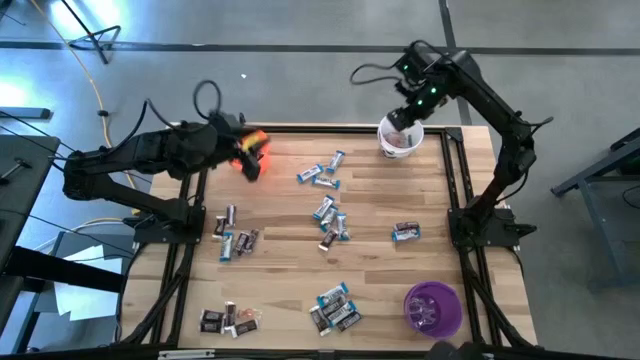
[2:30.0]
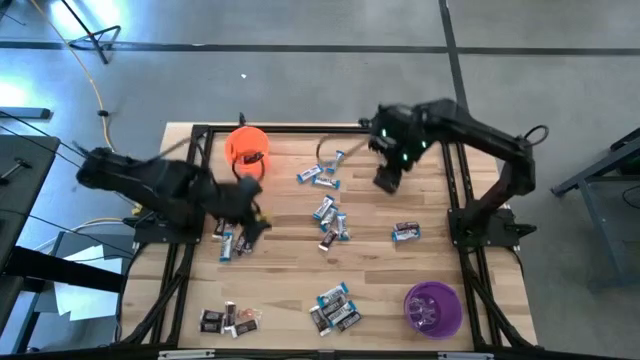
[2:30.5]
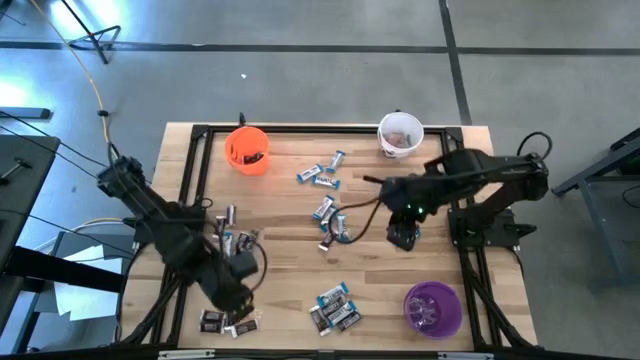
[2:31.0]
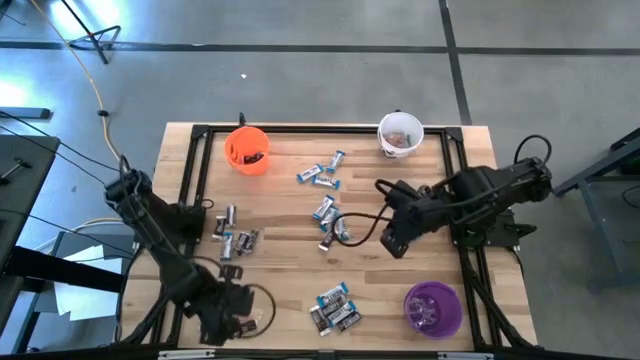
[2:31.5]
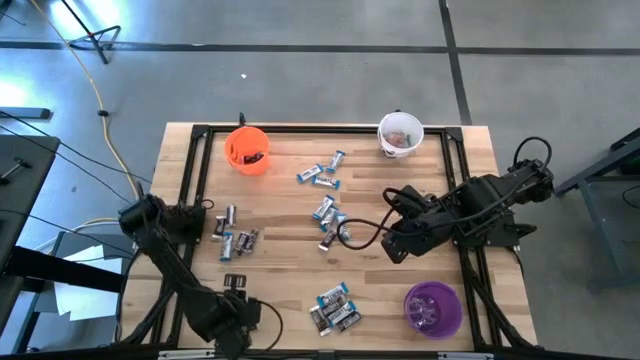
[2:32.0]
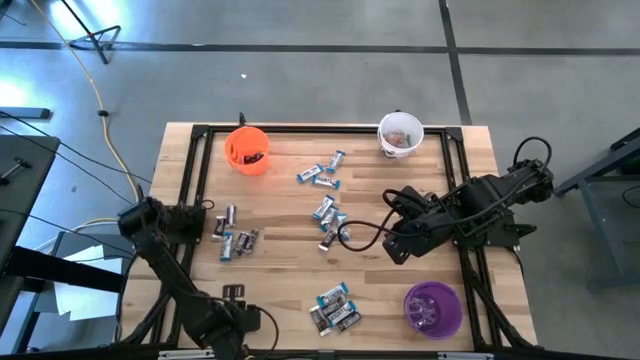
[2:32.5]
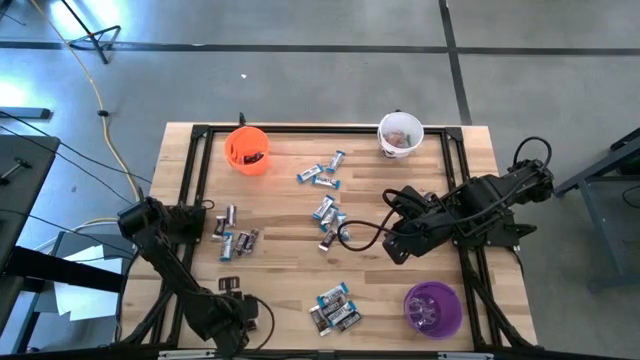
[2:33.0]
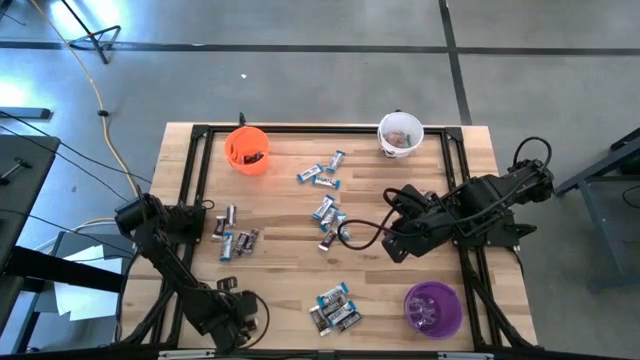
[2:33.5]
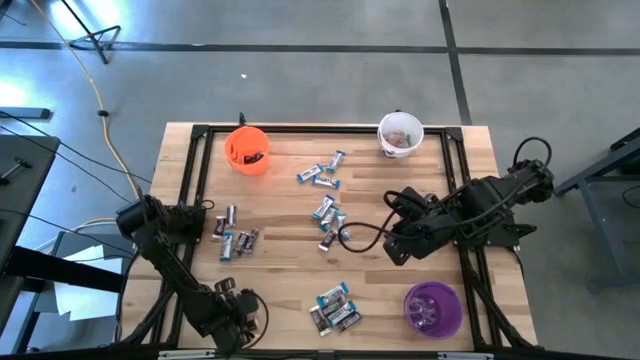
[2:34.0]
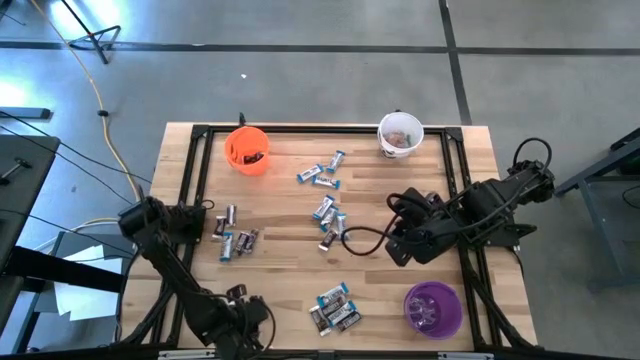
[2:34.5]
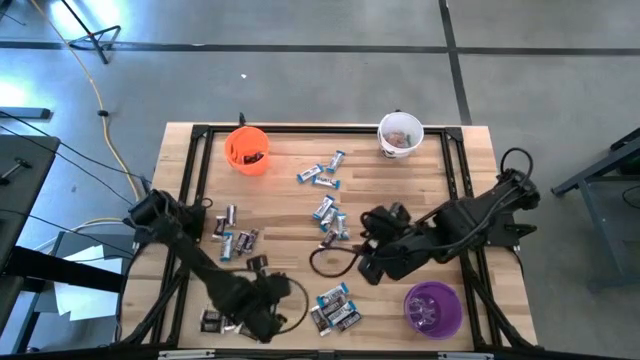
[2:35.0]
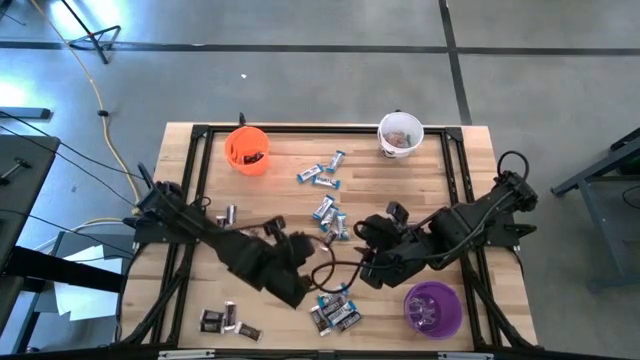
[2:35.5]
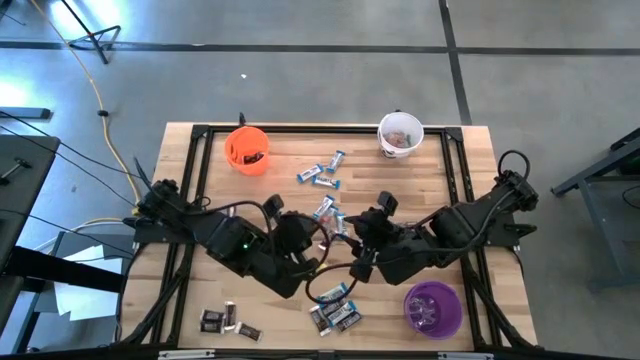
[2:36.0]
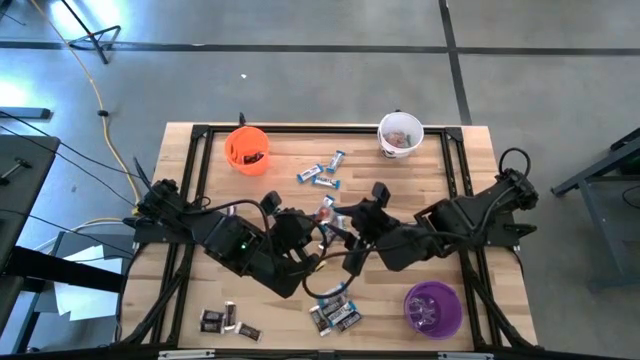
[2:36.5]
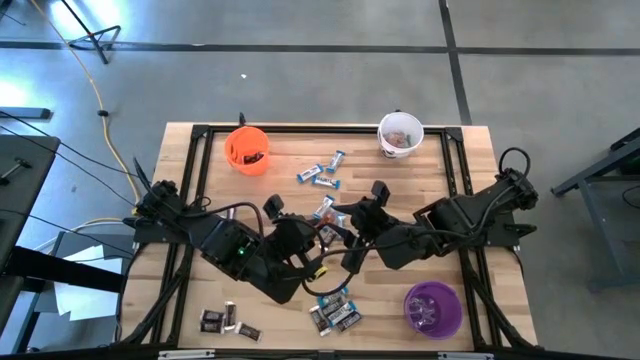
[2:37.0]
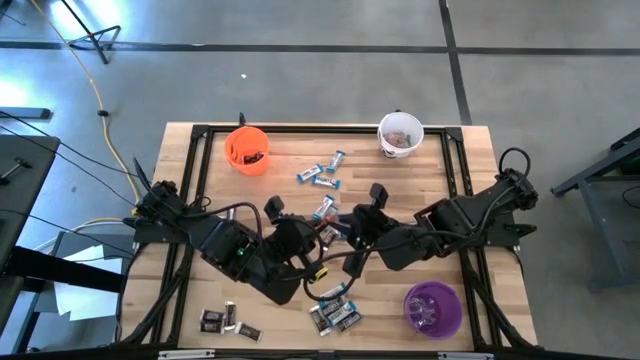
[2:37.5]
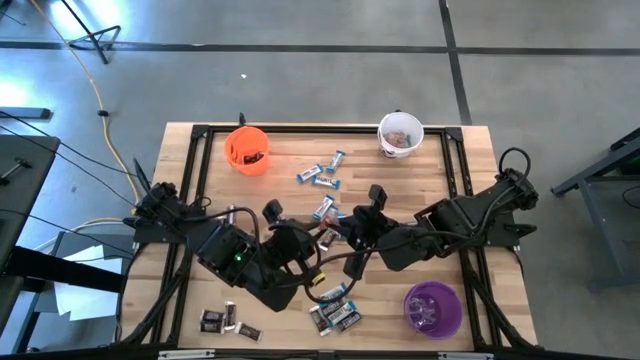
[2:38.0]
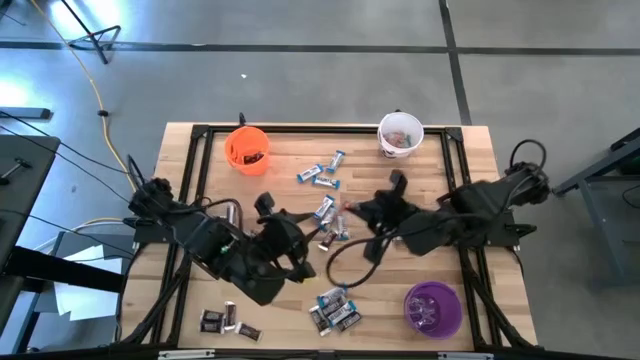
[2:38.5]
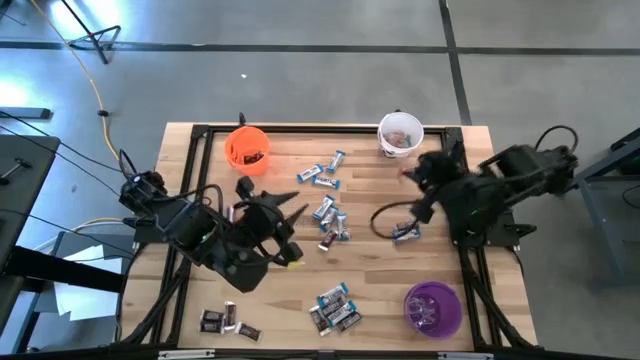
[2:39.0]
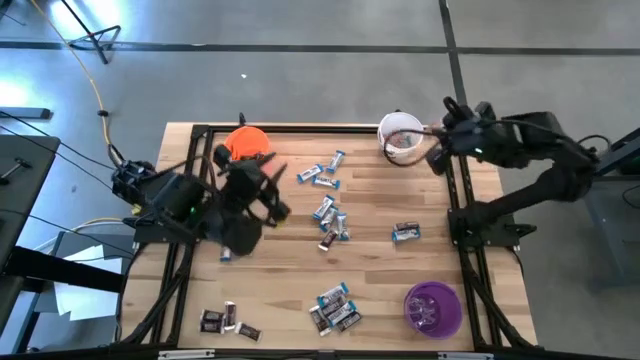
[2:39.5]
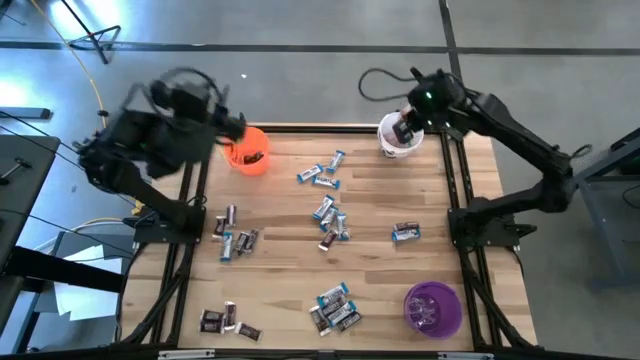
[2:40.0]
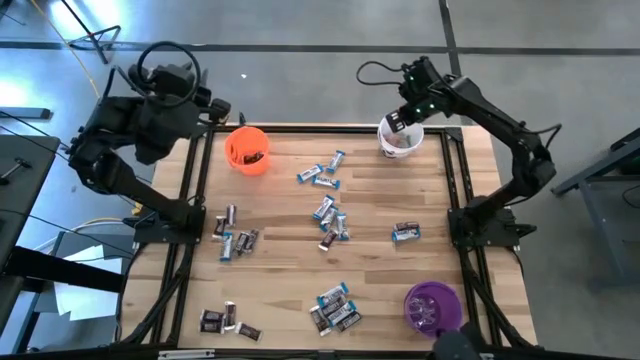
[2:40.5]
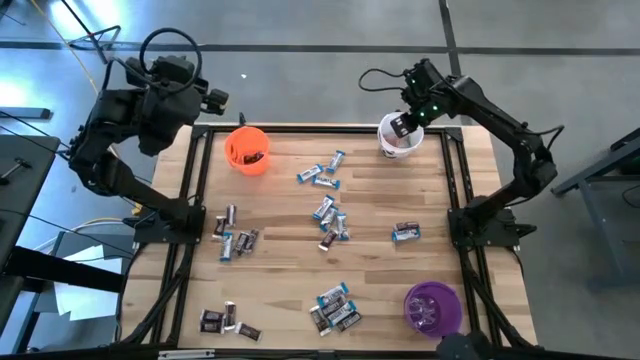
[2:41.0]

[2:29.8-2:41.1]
Task: Sort candy
Put the orange gummy into the white bucket

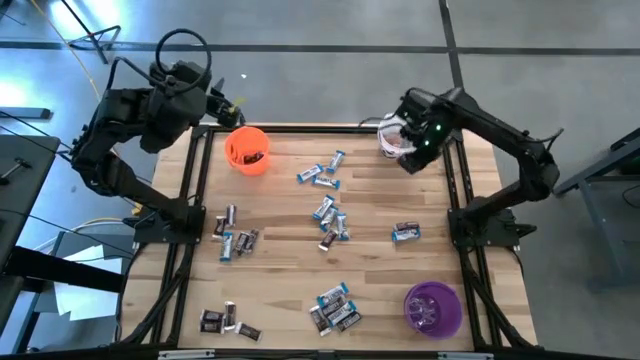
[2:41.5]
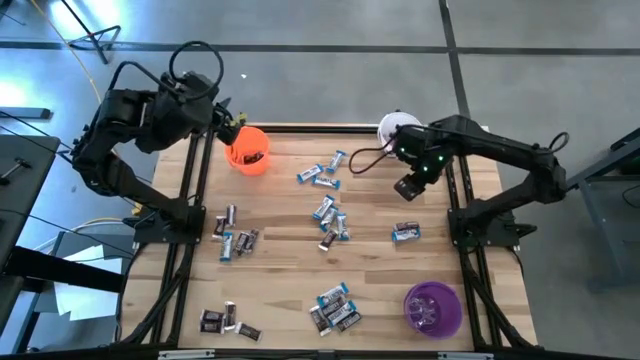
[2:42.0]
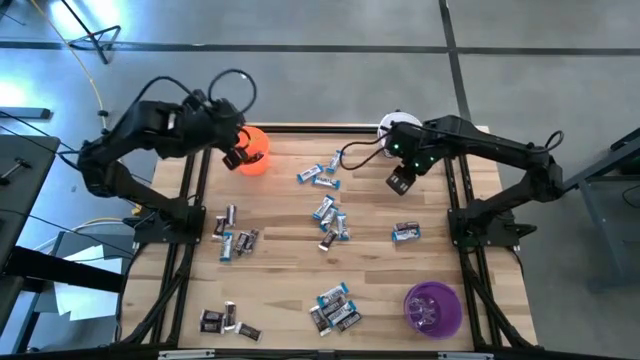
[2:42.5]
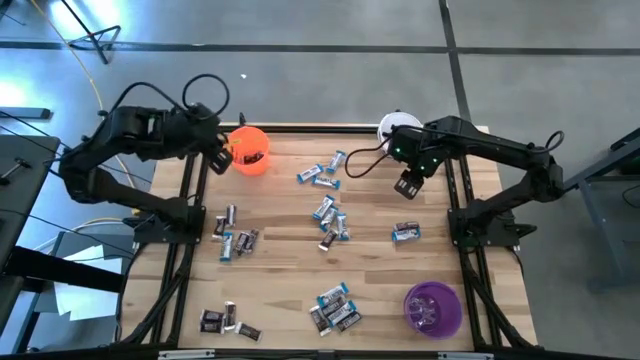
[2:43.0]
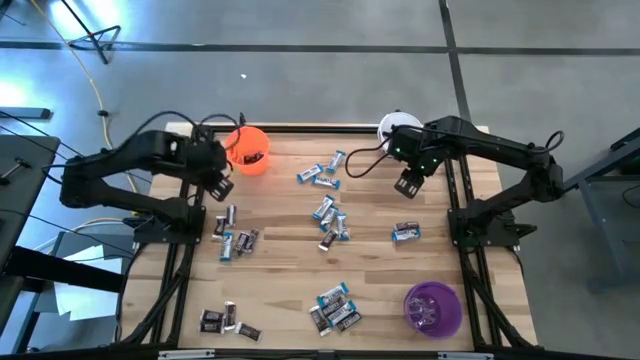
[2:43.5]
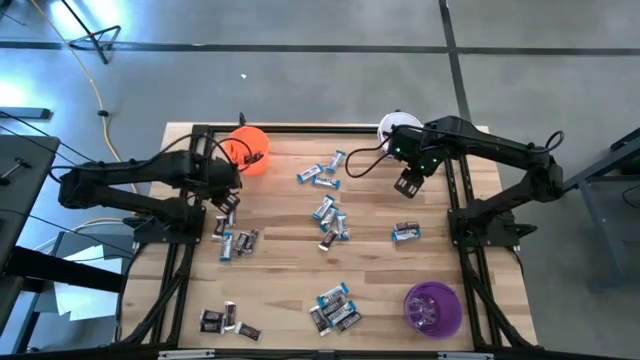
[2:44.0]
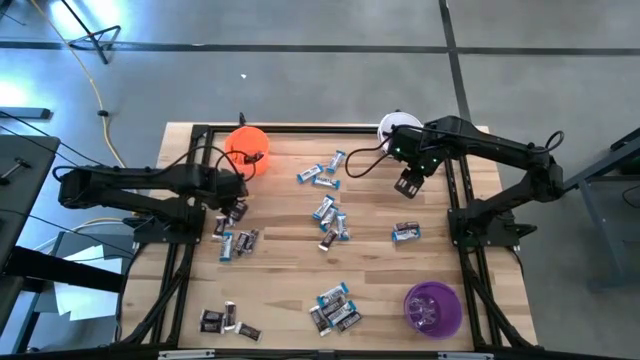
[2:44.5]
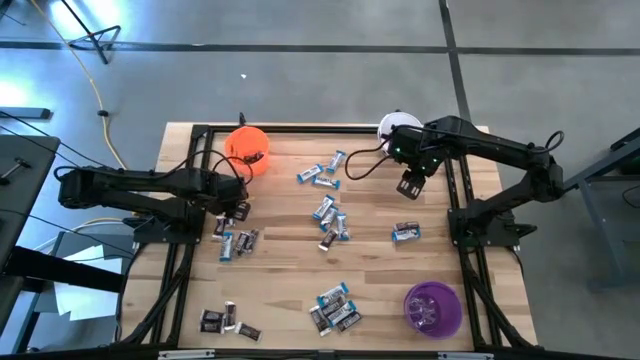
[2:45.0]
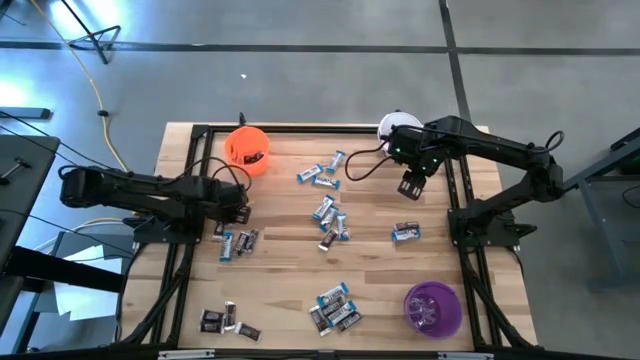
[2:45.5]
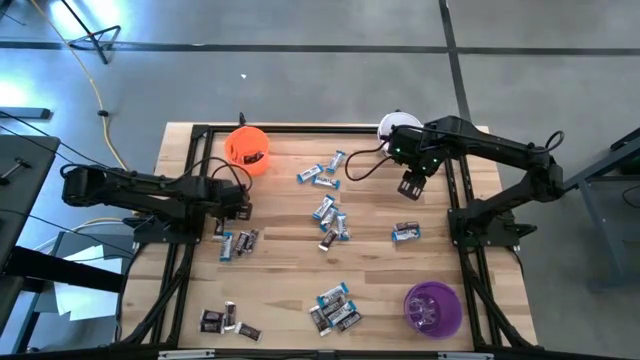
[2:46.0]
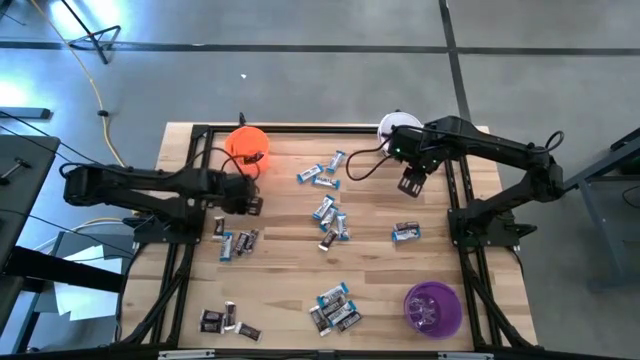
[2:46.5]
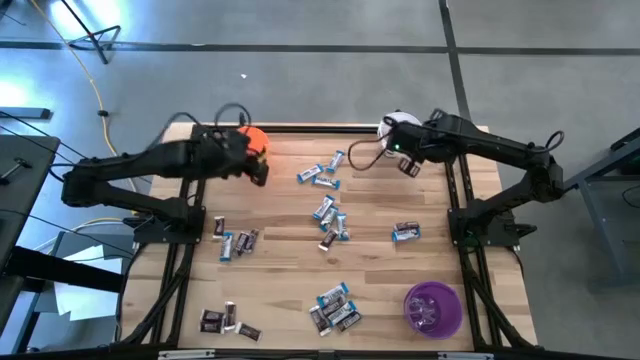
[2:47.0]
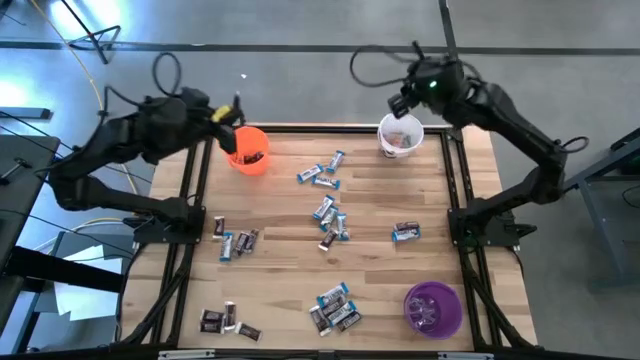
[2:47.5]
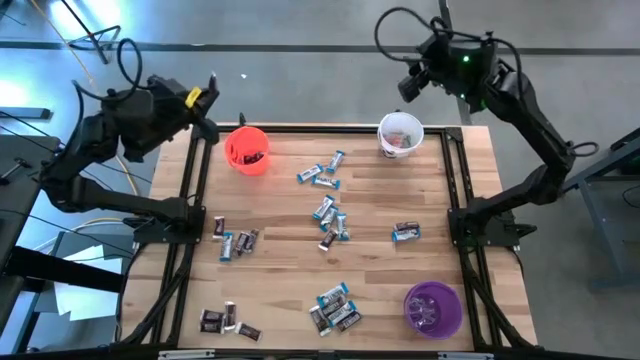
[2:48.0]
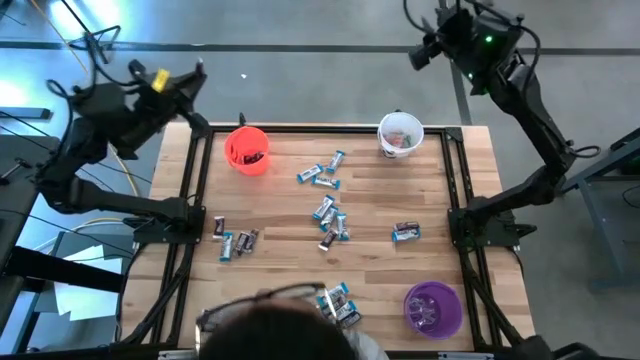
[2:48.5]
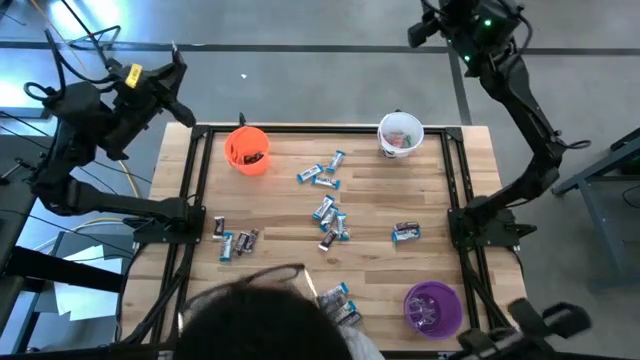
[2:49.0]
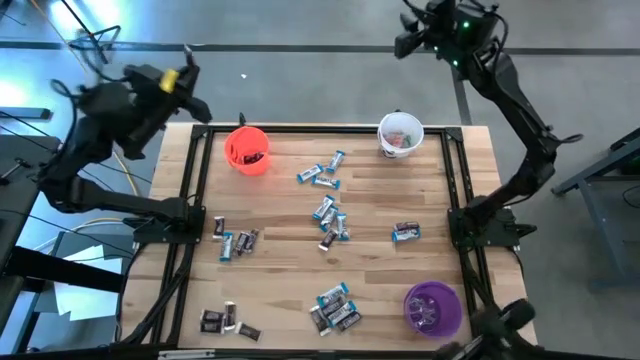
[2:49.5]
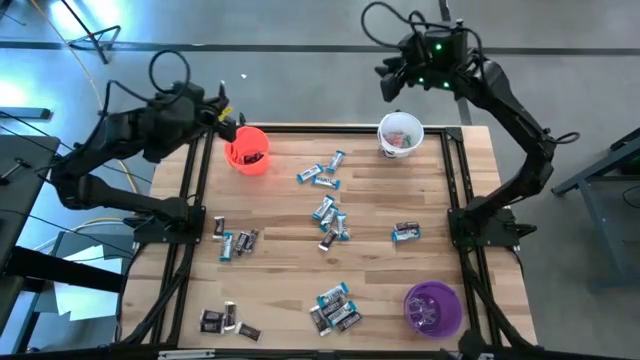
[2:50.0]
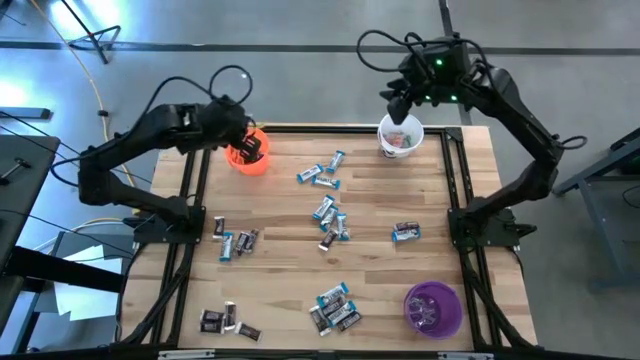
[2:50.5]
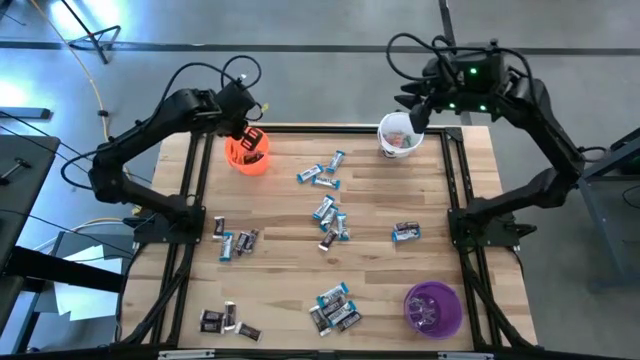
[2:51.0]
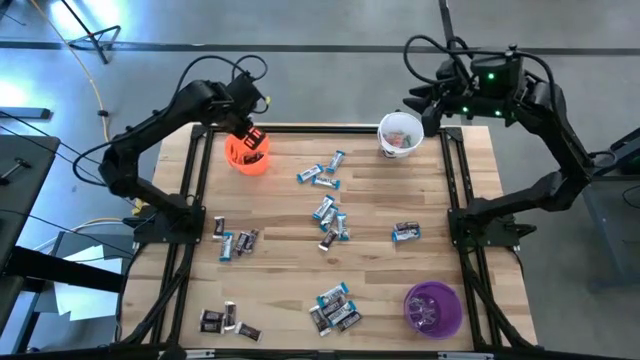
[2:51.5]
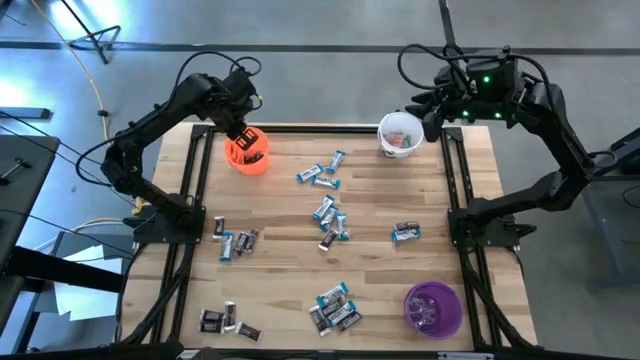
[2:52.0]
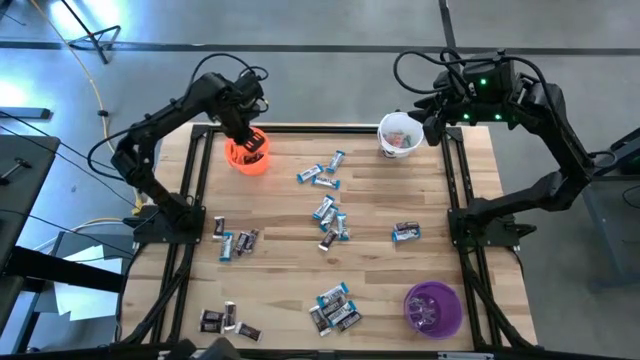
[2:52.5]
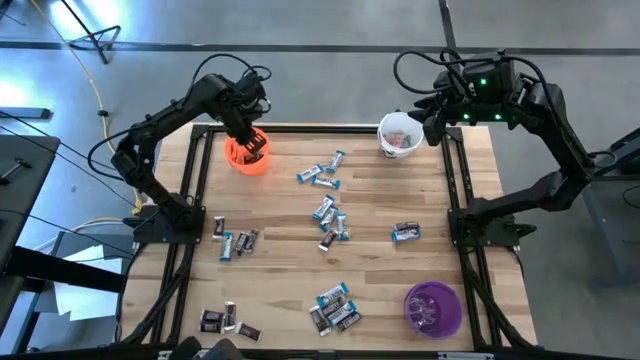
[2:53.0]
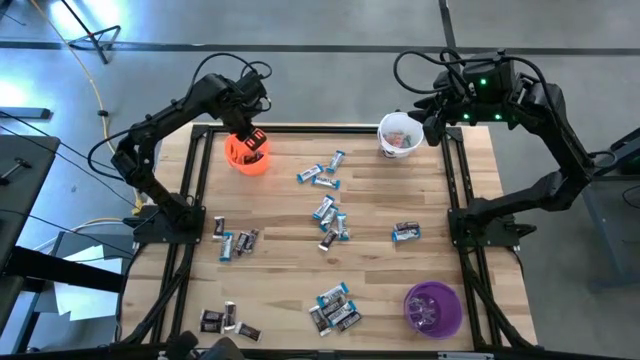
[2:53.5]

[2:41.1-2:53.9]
Put the brown chocolate into the orange bucket
